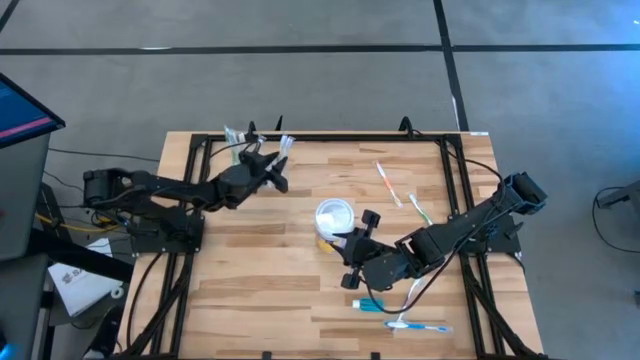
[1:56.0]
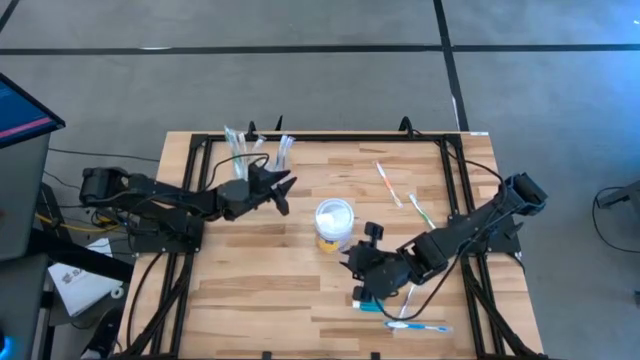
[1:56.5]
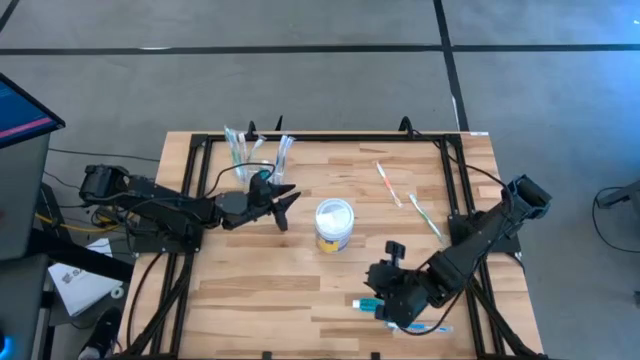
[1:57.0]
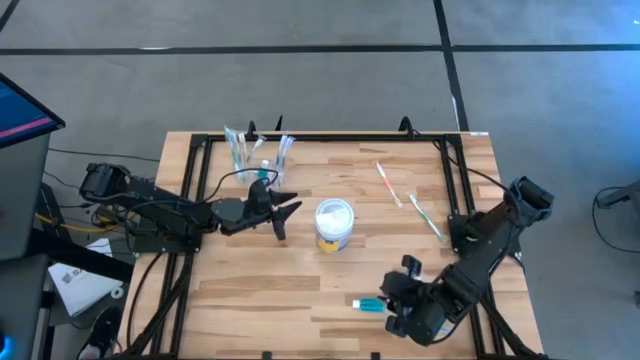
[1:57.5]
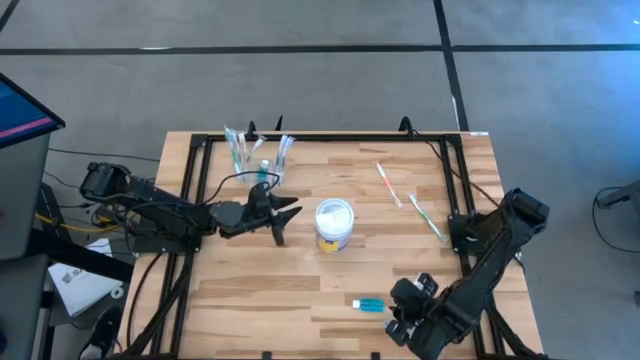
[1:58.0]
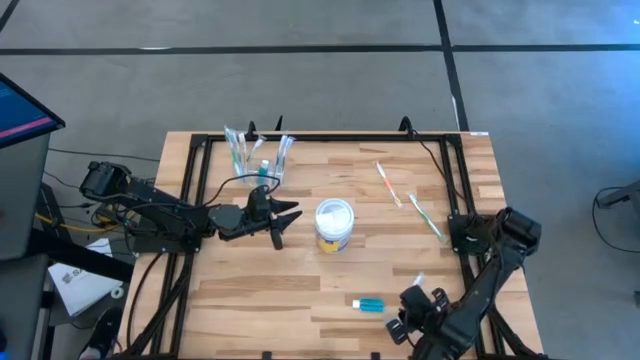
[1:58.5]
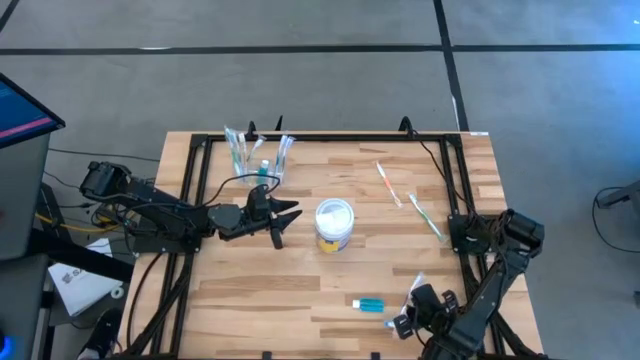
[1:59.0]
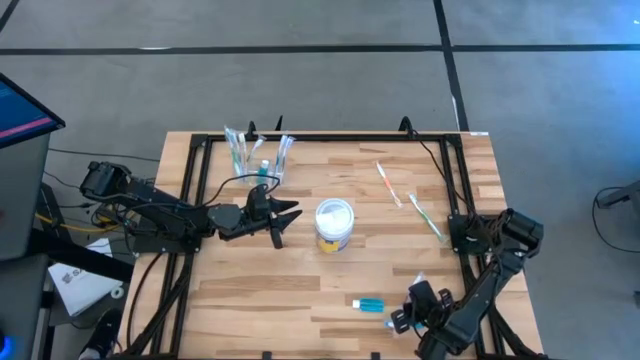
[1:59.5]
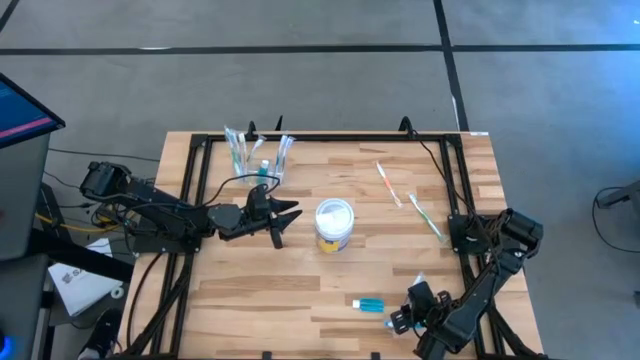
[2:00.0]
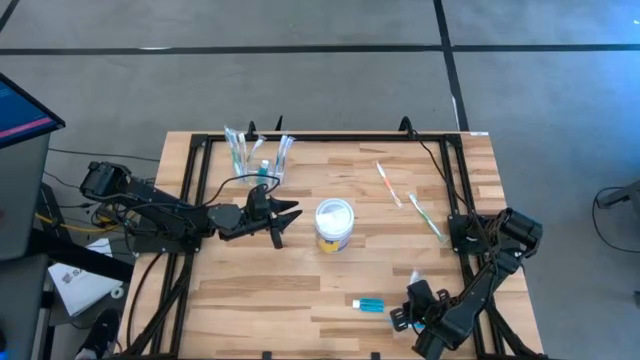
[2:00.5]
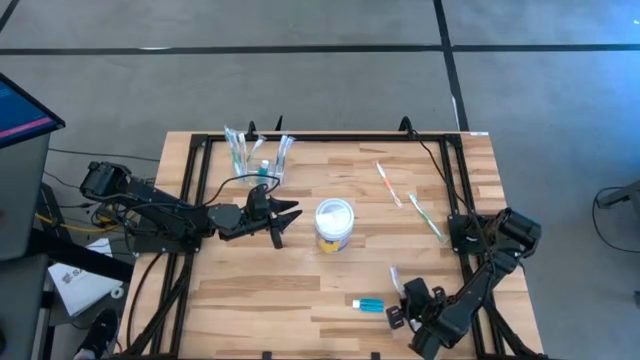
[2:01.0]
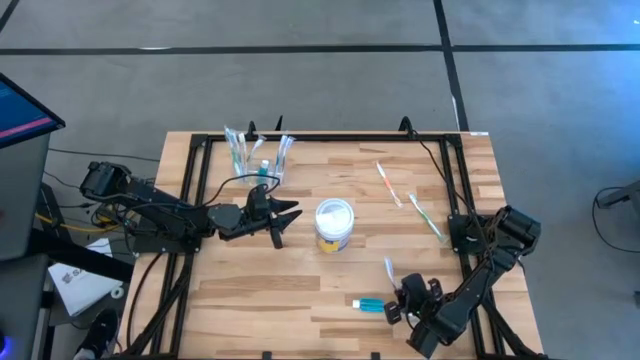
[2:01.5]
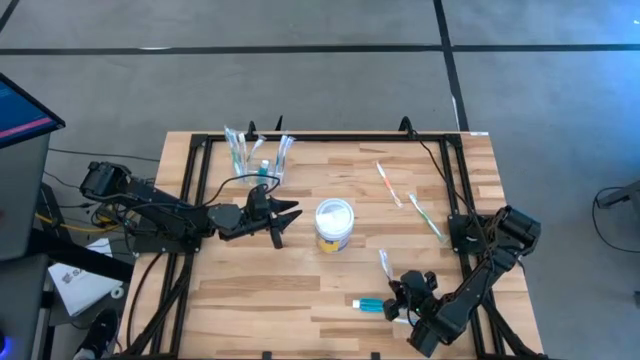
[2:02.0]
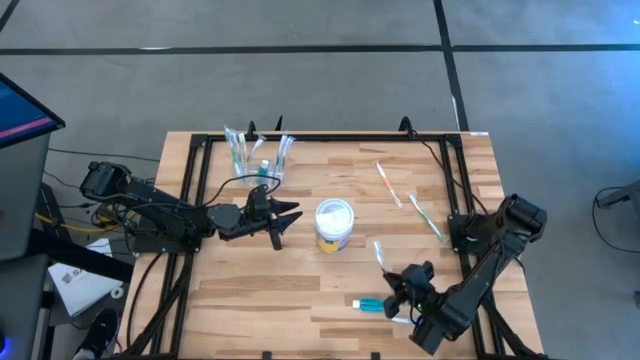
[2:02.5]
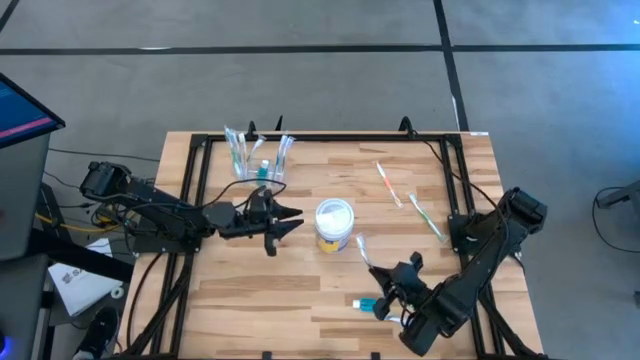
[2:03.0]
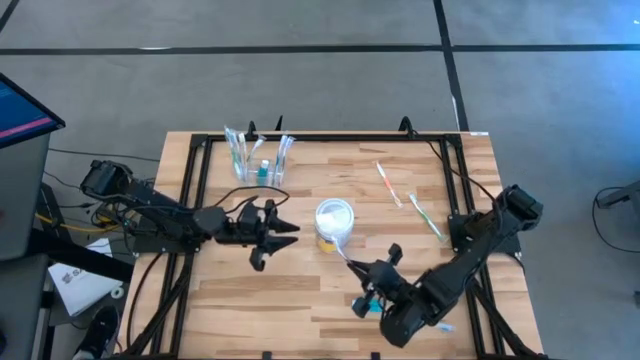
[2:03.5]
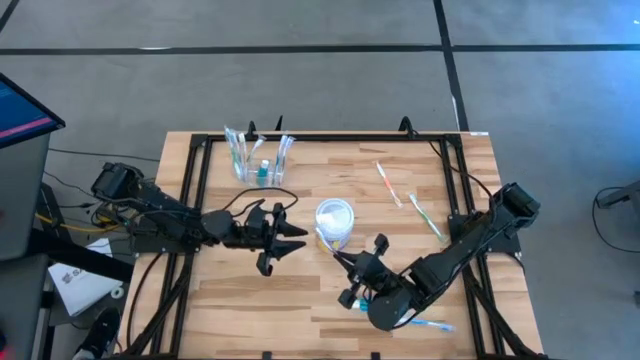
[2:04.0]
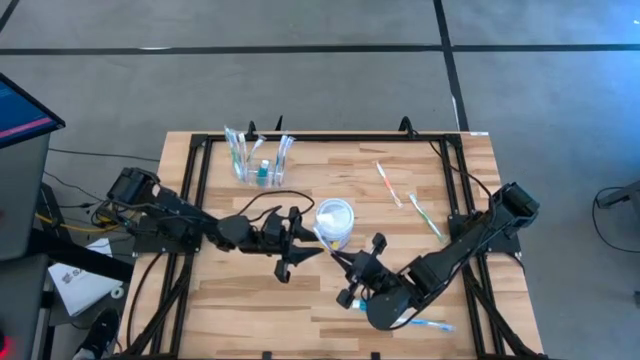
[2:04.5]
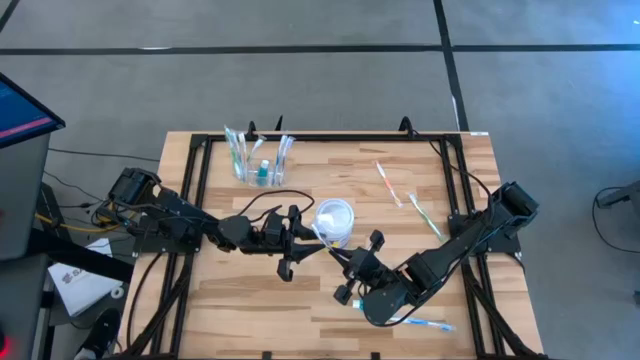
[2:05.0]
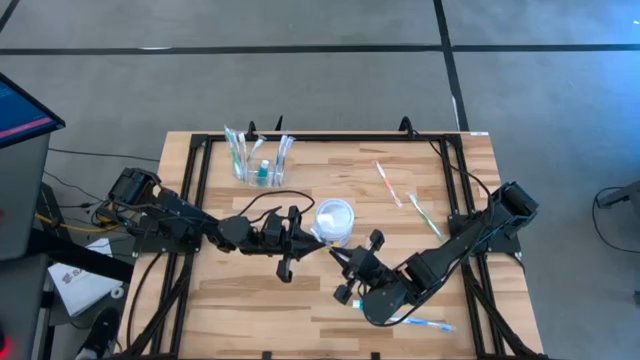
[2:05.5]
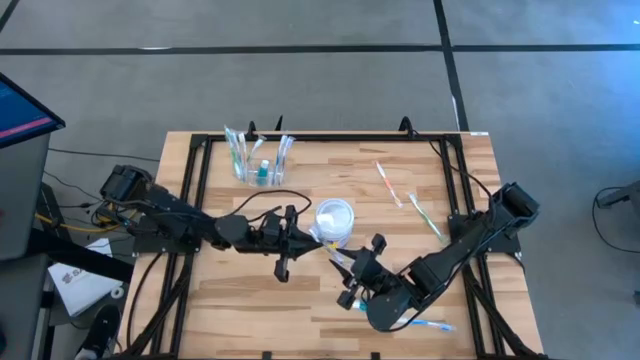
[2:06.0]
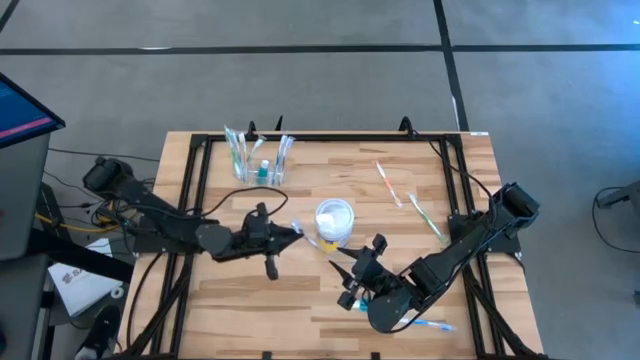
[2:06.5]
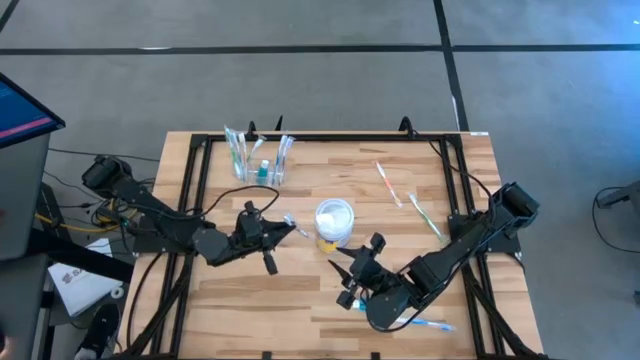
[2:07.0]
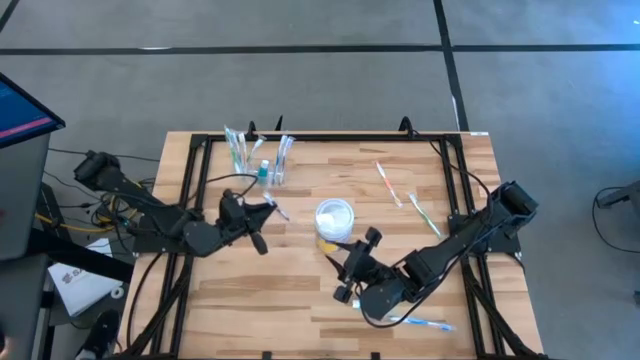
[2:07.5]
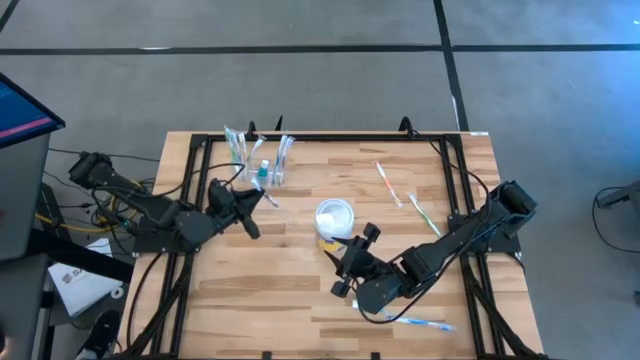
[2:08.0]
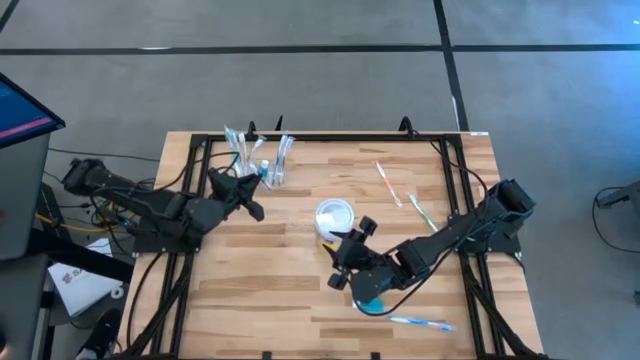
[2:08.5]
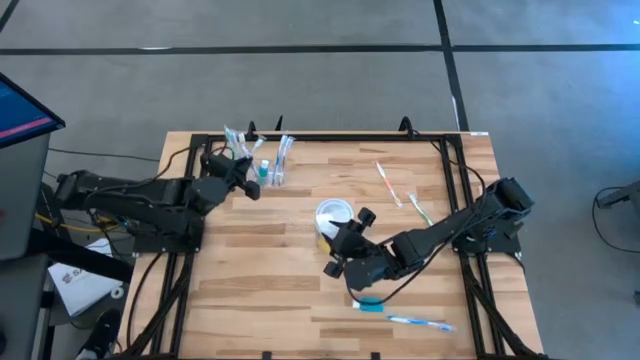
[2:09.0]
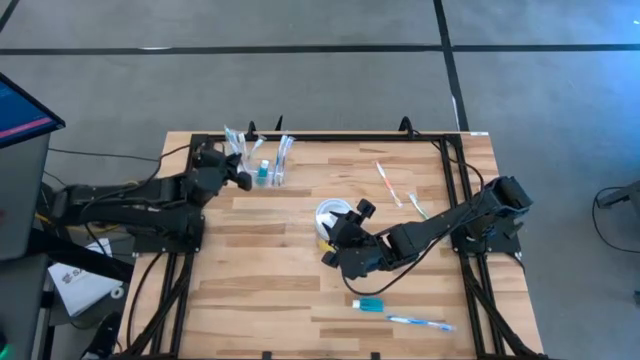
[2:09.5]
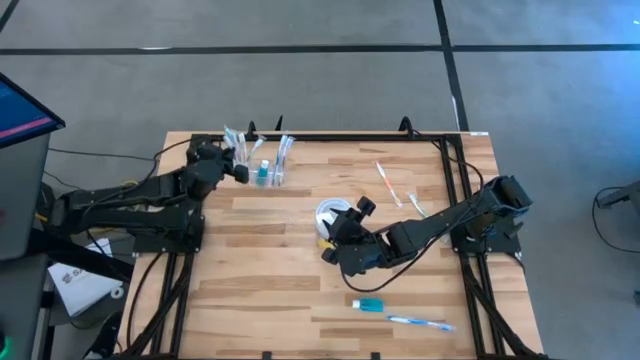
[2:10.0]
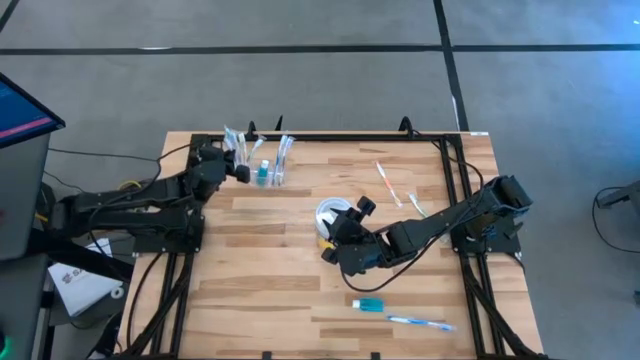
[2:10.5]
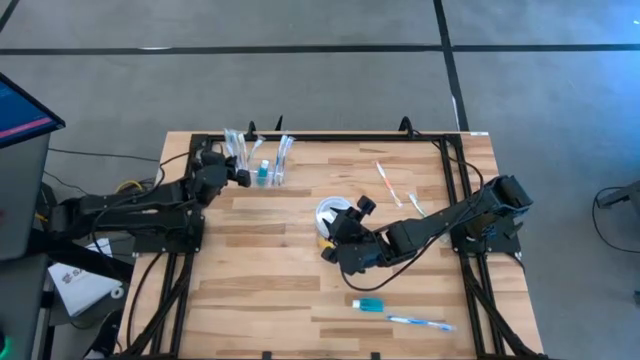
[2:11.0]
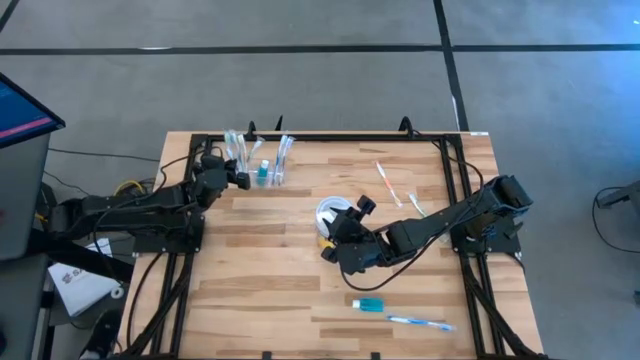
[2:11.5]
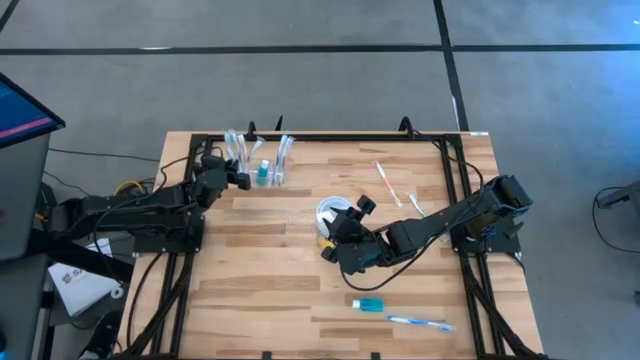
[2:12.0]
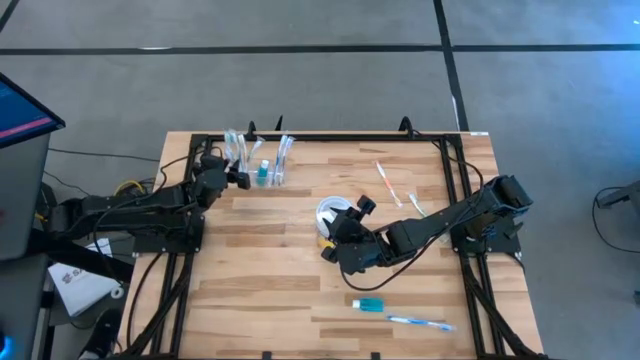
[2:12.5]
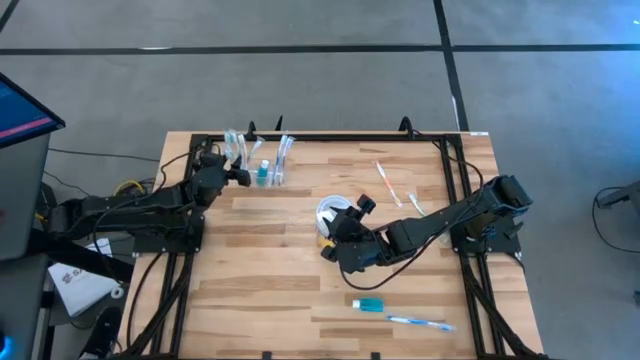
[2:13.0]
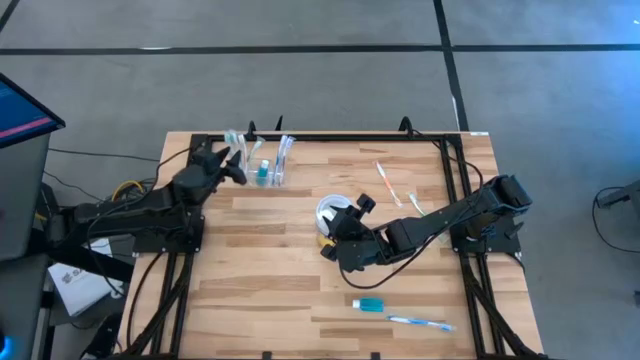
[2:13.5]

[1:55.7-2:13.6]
Task: Pick & Place toothbrushing station
Put the purple toothbrush into the transparent organizer

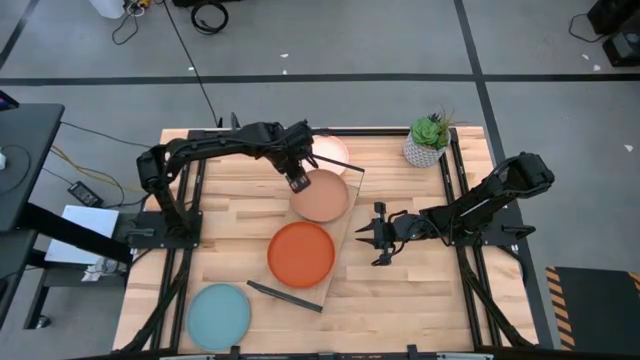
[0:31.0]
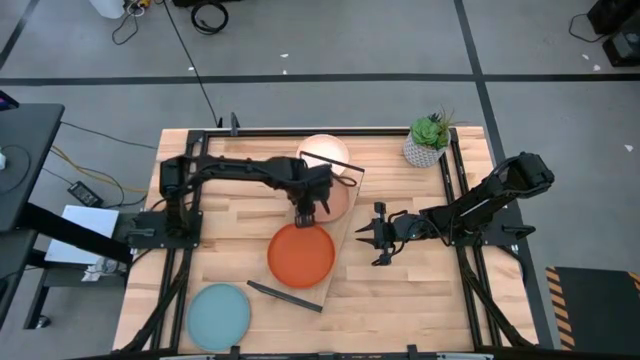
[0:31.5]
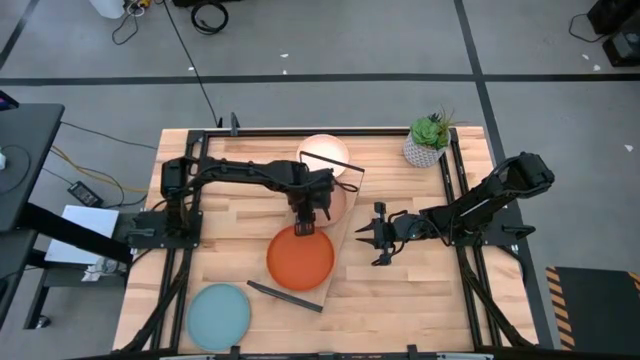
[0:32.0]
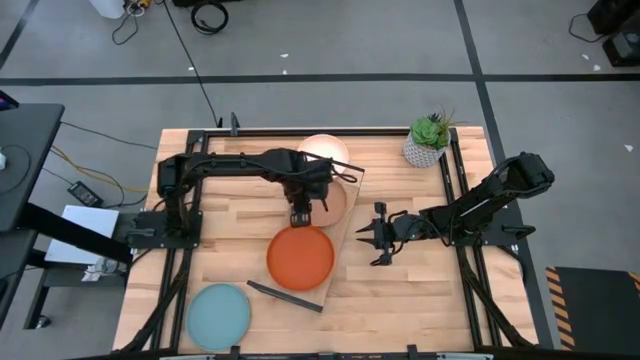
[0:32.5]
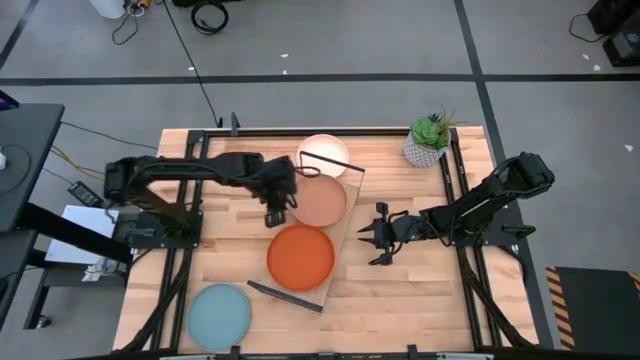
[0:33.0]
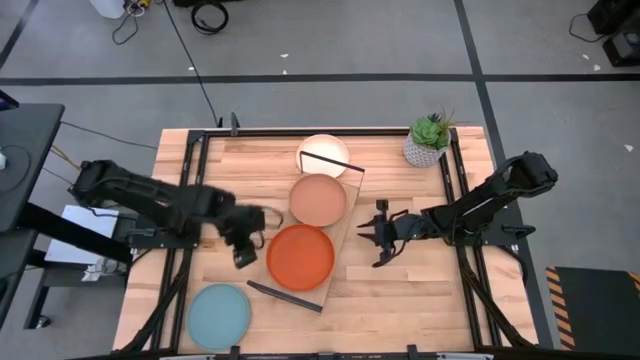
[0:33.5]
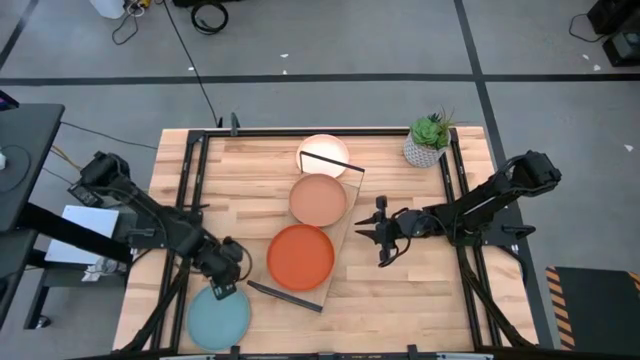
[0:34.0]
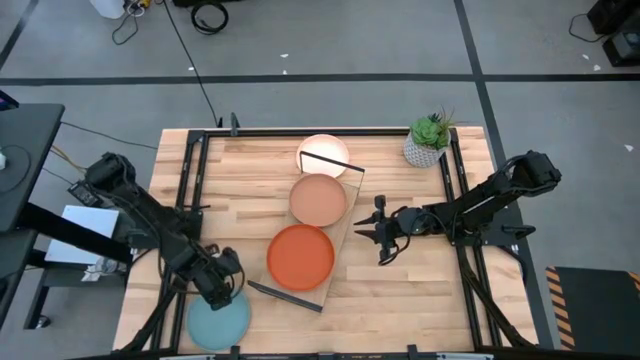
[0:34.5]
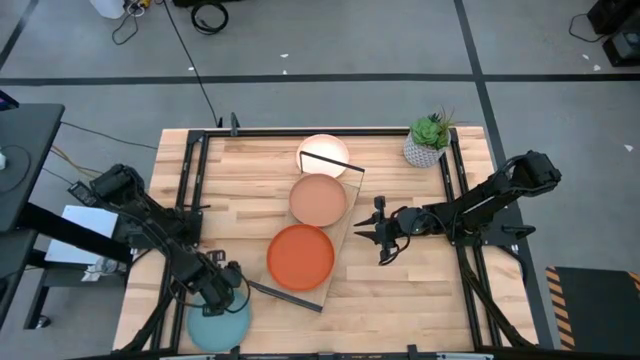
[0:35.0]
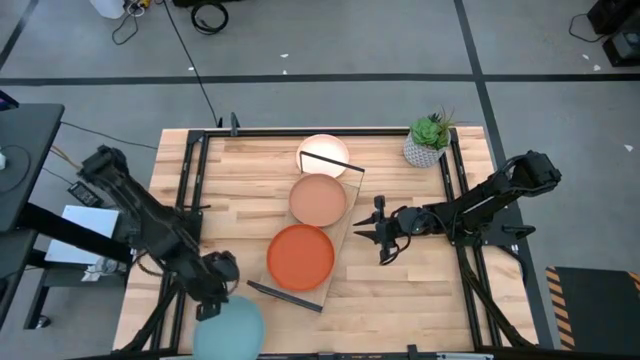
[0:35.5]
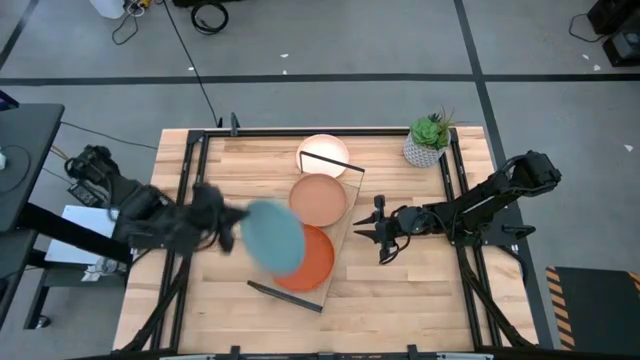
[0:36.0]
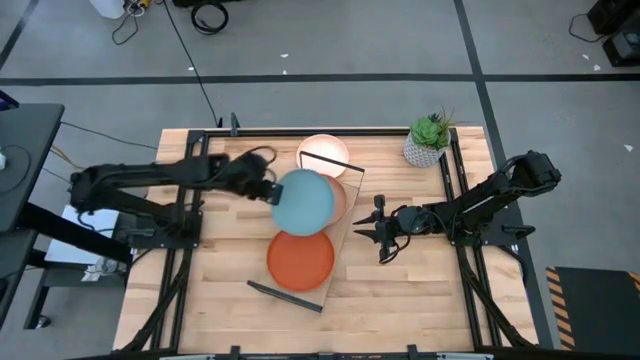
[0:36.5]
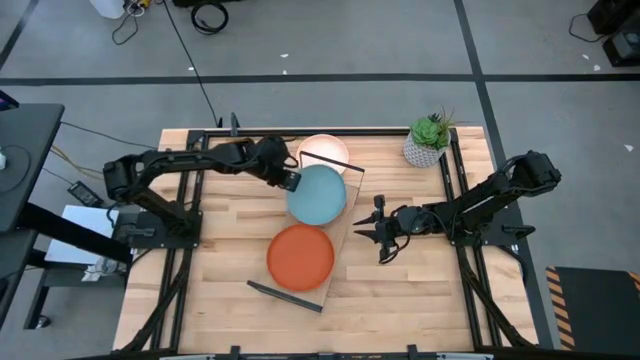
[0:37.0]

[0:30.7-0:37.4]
Task: Place and stack plates onto a shelf
Stack the light blue plate on top of the brown plate on the shelf
